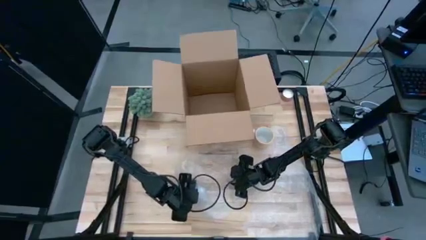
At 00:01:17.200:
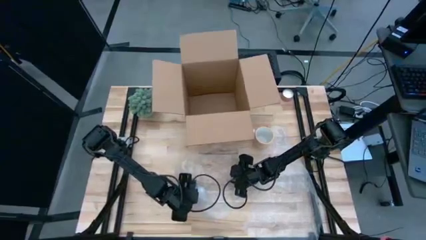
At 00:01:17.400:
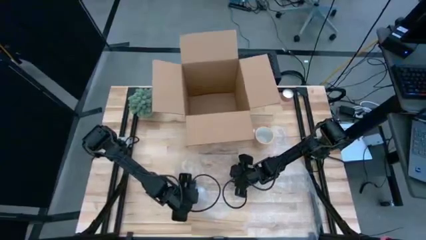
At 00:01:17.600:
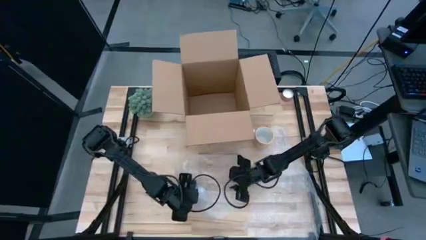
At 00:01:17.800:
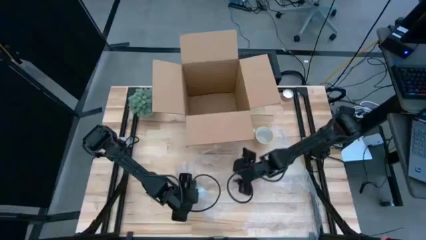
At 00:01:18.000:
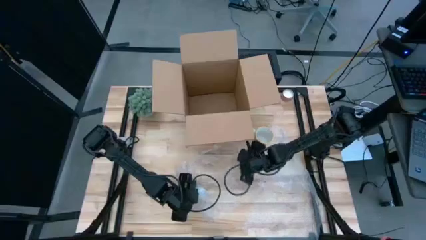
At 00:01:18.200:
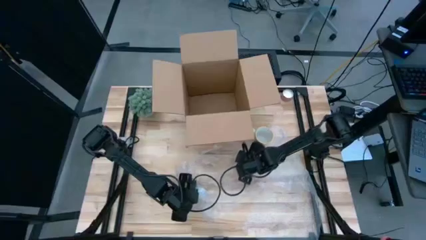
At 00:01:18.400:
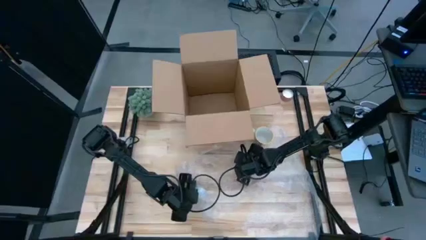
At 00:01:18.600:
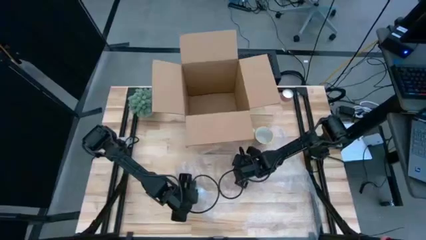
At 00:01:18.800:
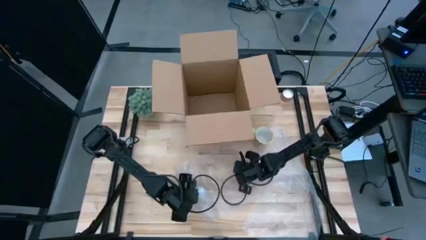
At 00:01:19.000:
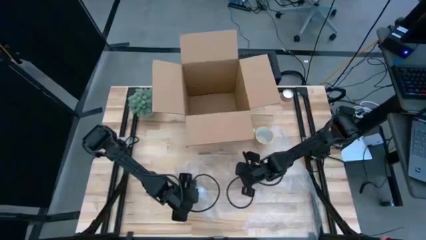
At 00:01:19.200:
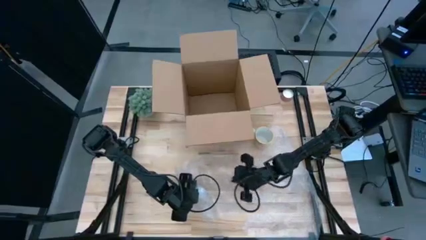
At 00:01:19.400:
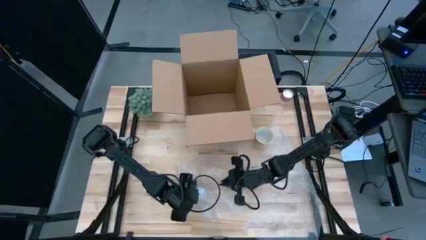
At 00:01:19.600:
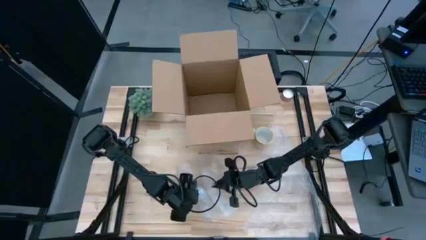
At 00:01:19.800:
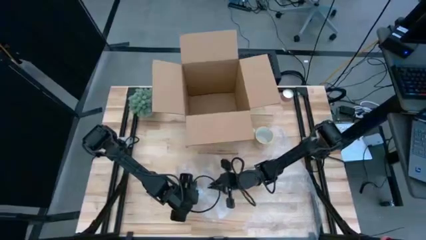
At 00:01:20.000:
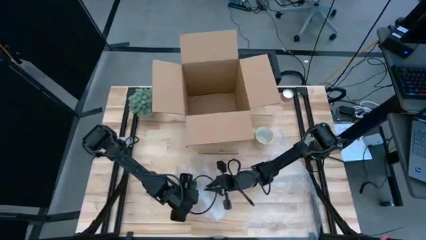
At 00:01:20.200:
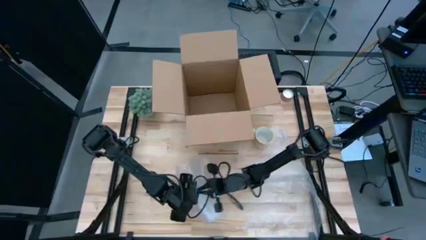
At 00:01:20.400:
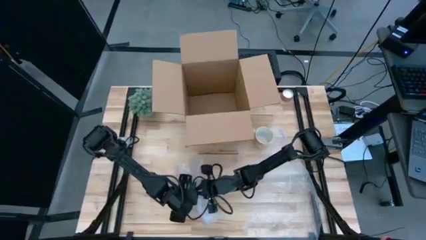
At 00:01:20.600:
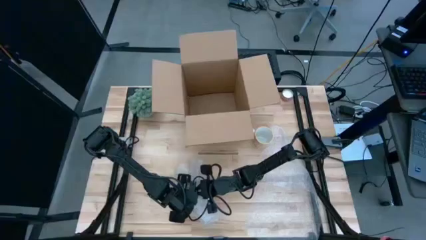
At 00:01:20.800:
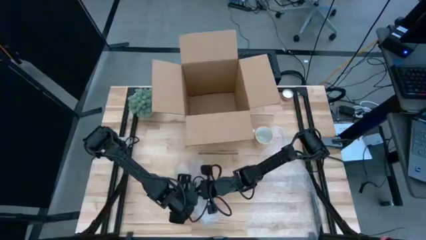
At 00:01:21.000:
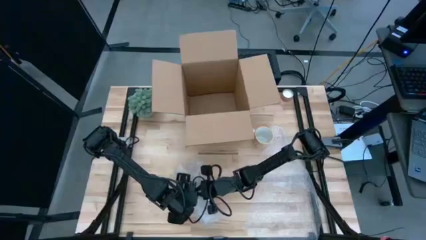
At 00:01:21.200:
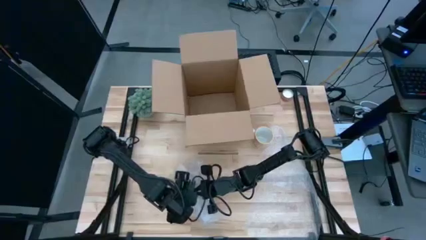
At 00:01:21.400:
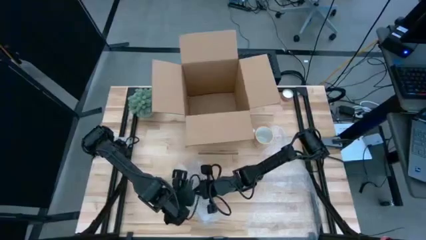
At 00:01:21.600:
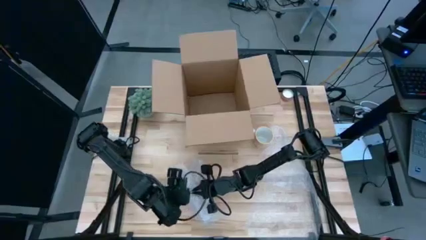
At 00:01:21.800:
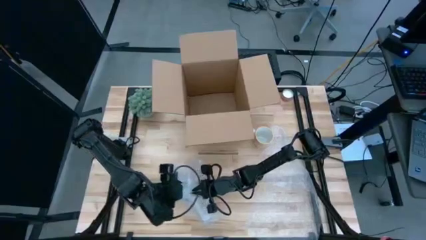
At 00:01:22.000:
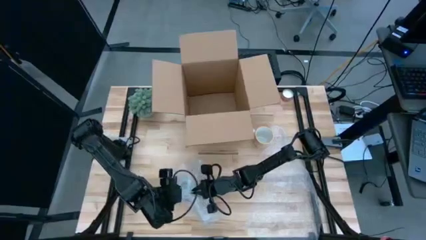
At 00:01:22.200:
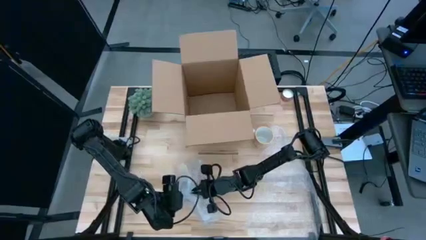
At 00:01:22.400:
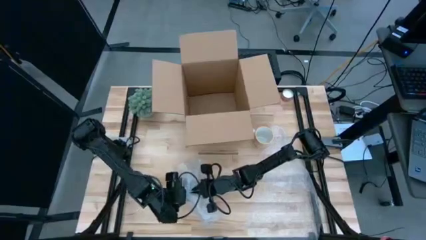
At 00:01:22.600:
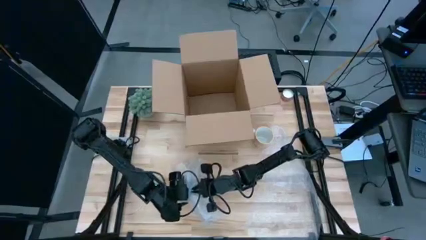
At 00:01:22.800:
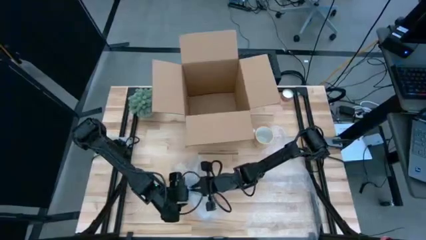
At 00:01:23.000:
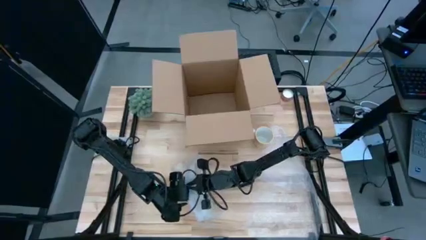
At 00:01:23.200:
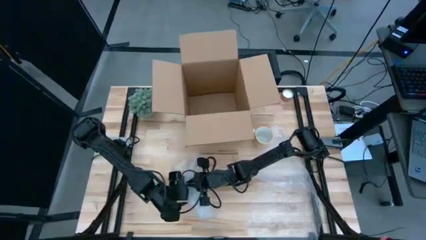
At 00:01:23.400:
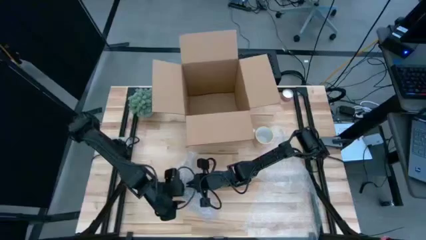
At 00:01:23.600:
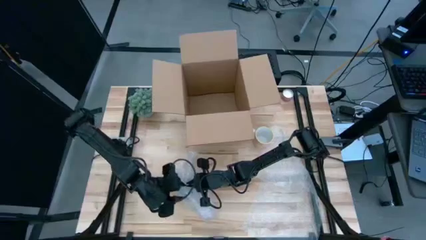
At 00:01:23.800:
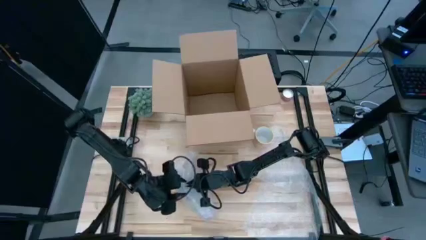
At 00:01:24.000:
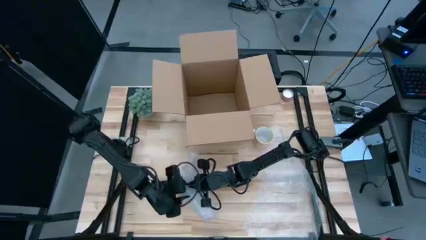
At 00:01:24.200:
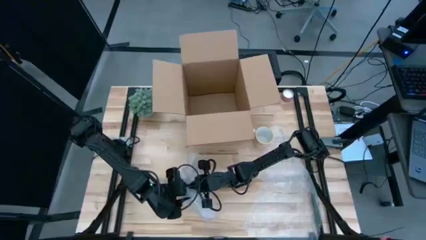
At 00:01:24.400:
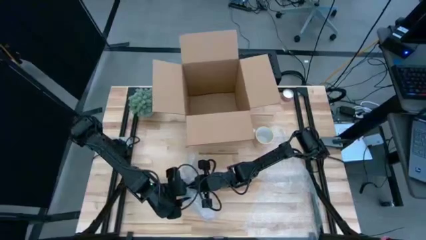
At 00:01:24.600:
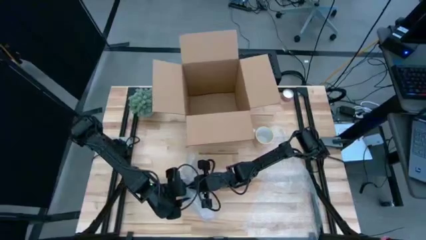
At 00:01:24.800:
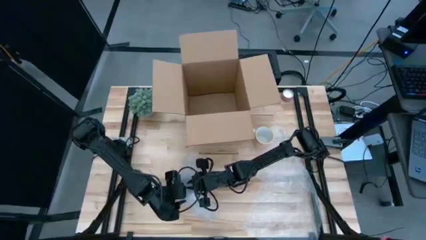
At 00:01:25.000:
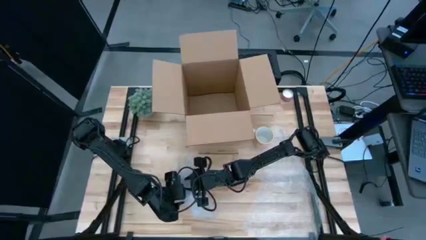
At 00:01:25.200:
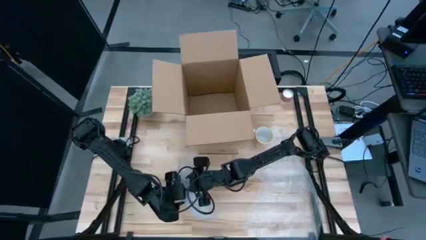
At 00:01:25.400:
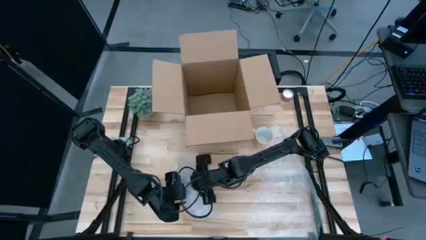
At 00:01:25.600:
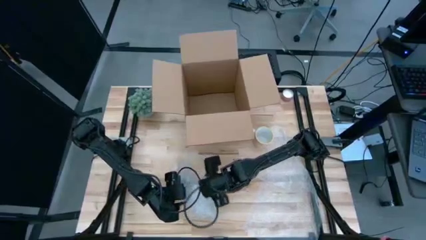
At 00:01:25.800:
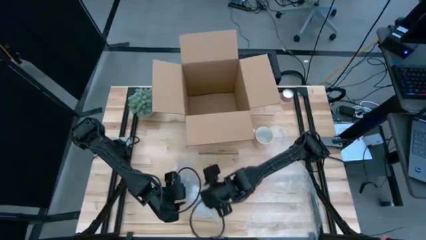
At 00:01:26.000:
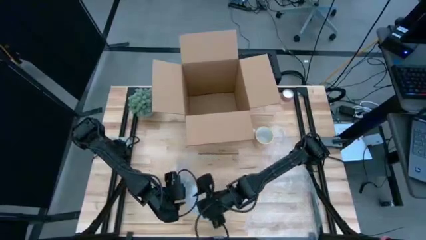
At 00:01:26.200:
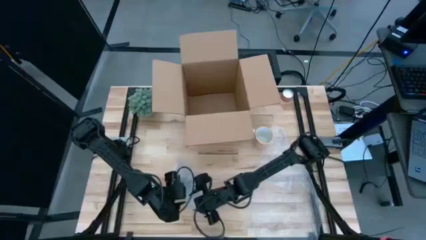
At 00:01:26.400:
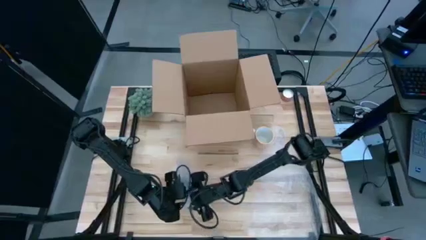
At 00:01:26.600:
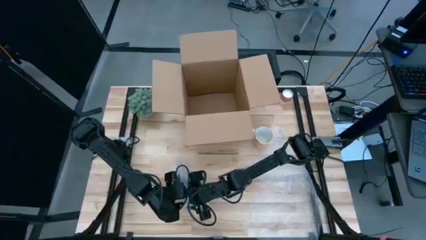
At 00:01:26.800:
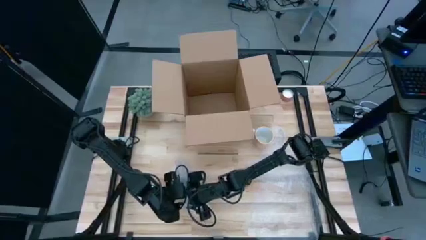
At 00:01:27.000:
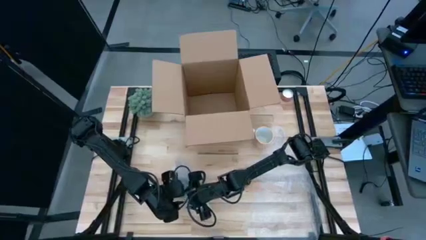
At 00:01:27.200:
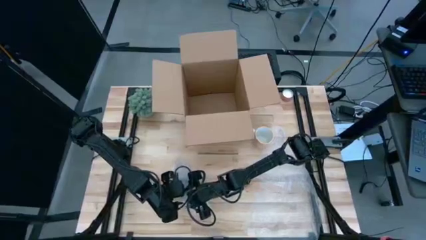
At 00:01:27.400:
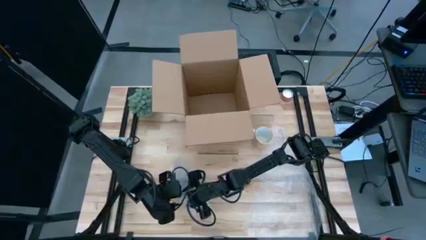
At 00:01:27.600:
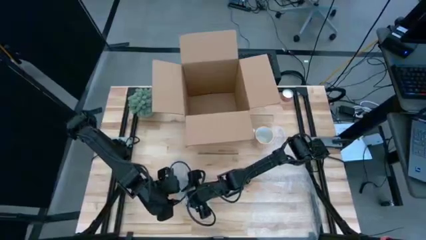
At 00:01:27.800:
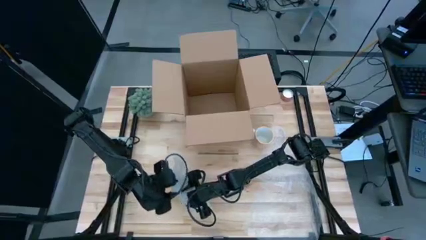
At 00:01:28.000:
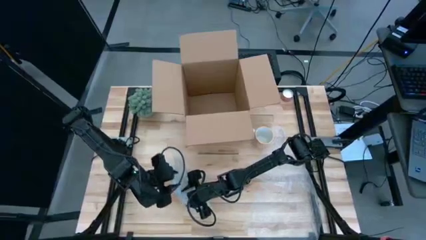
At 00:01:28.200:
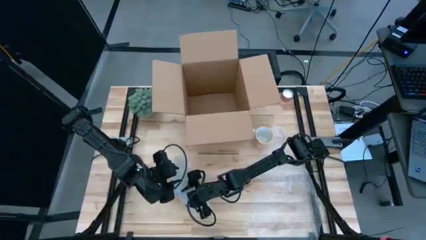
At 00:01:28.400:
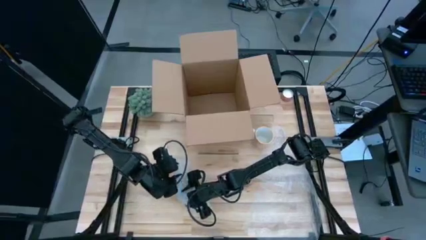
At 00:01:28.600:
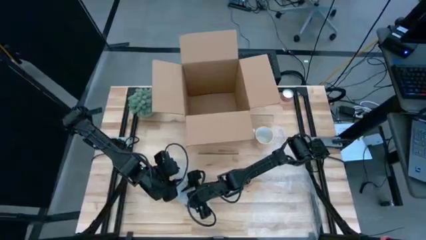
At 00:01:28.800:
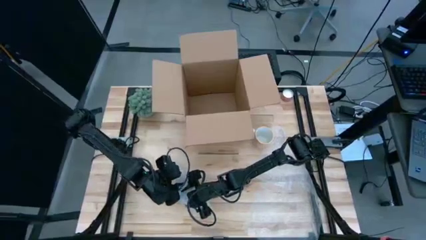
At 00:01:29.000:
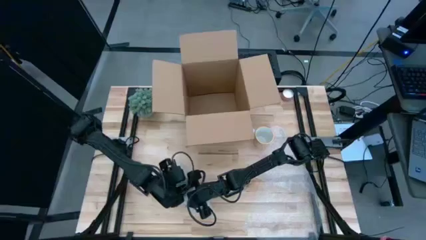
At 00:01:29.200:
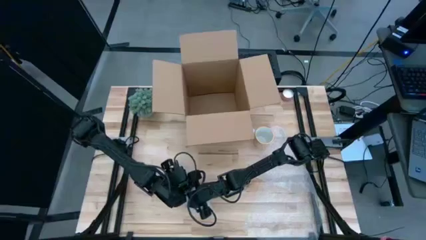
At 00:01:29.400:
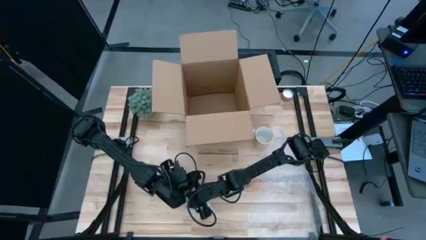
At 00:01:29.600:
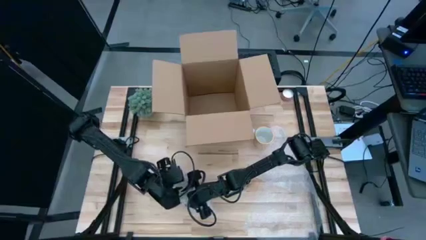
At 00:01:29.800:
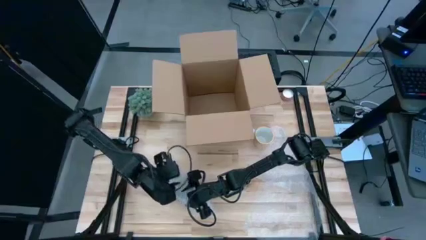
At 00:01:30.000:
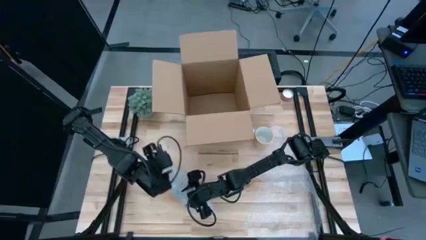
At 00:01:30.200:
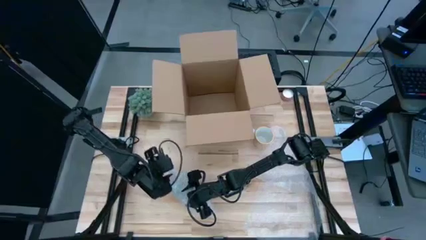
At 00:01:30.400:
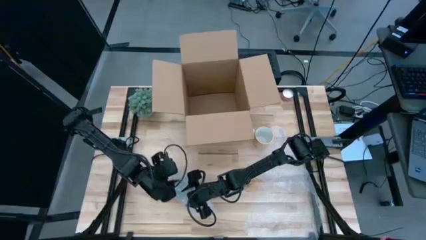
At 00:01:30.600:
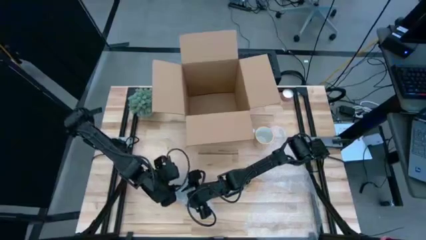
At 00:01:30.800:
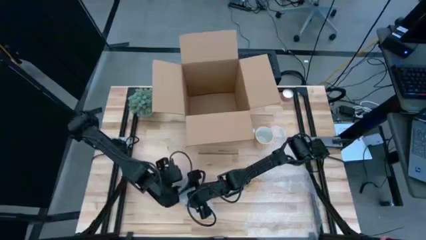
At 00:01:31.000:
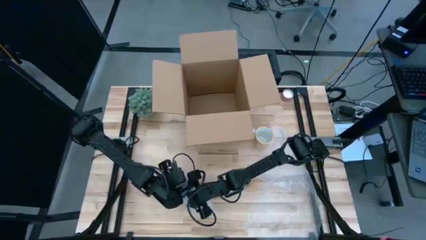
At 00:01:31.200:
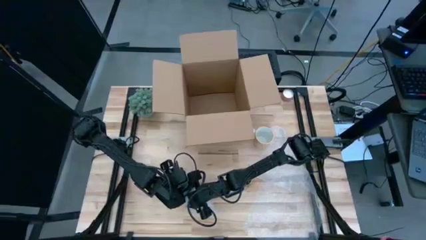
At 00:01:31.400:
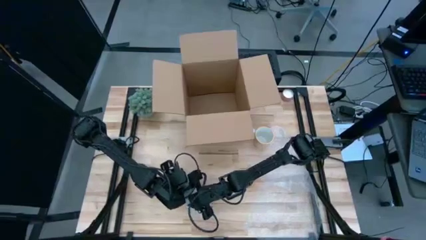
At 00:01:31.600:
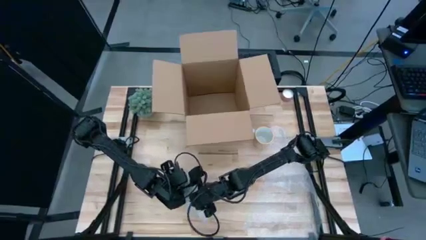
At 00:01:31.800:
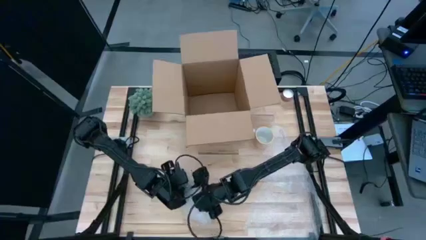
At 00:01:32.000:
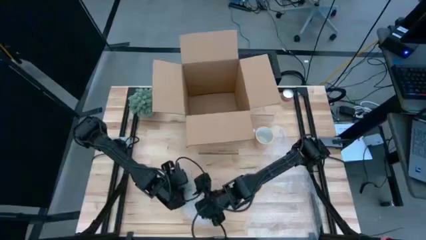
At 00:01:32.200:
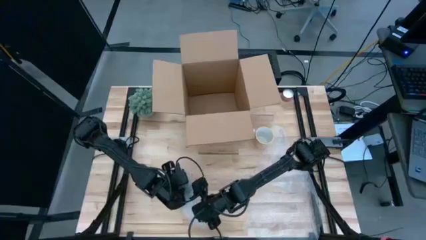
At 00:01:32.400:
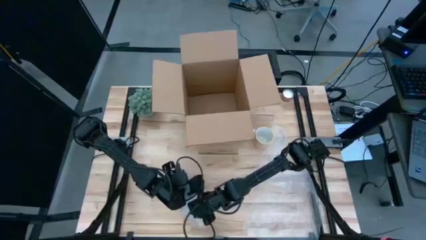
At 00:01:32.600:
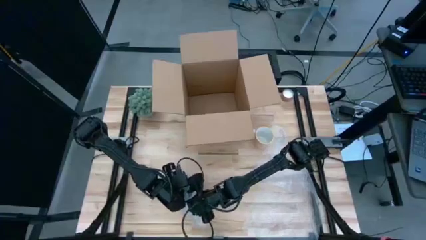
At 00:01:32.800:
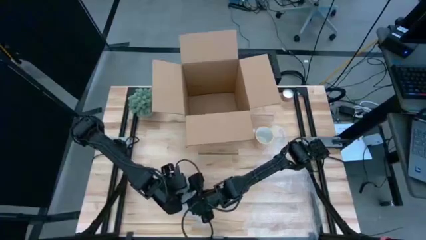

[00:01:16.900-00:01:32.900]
Task: wrap mug
Wrap the red cup in the bubble wrap
